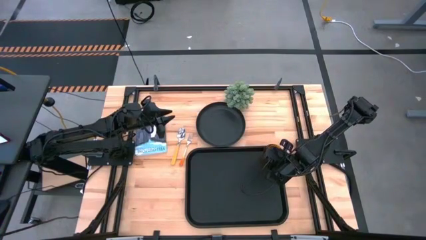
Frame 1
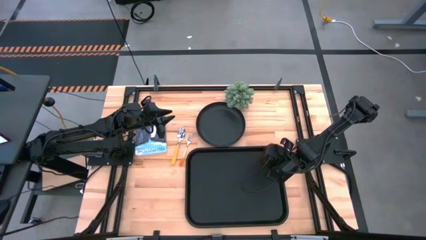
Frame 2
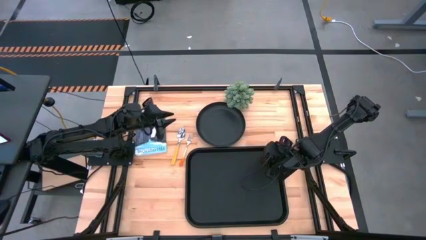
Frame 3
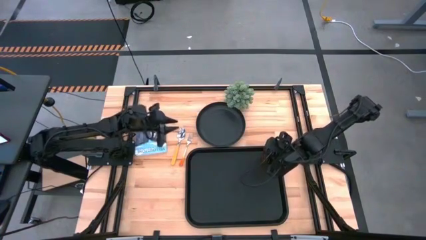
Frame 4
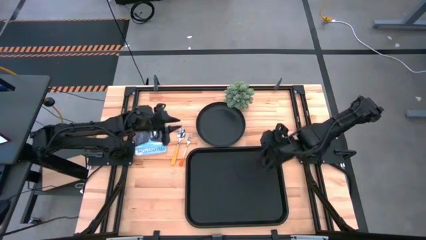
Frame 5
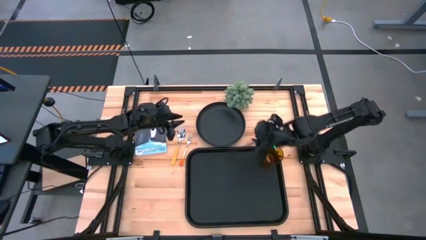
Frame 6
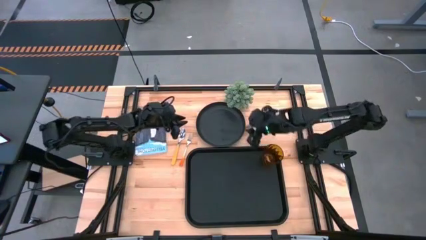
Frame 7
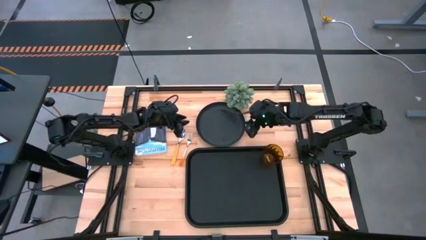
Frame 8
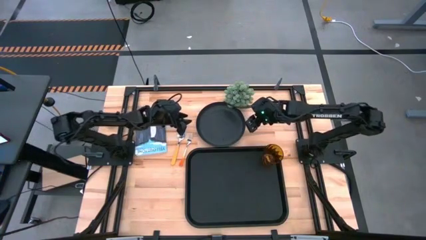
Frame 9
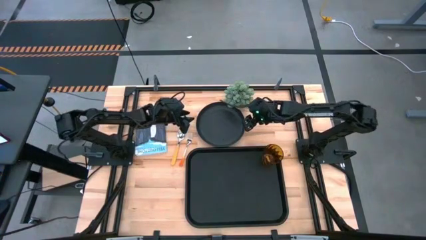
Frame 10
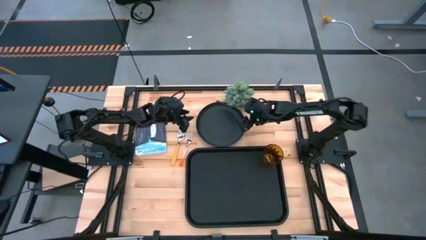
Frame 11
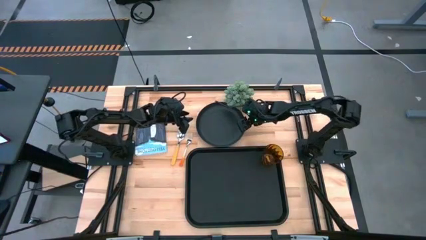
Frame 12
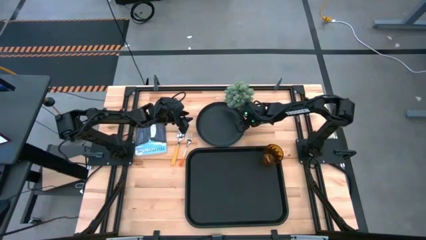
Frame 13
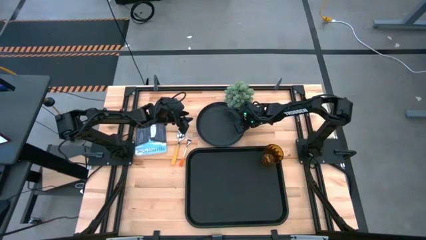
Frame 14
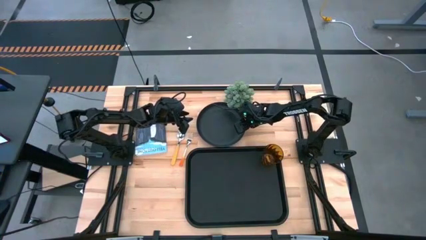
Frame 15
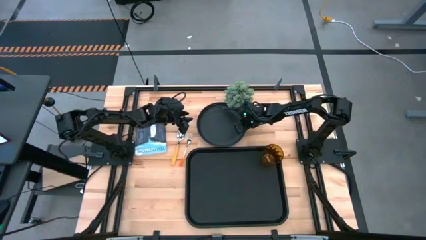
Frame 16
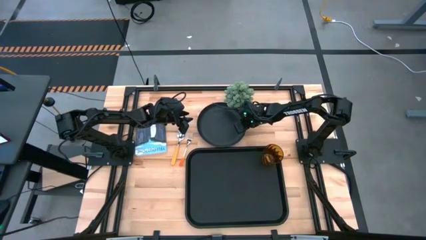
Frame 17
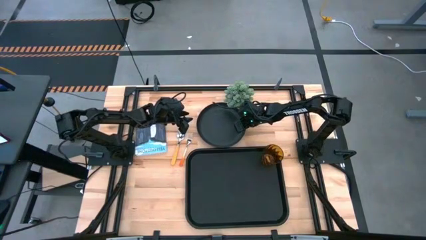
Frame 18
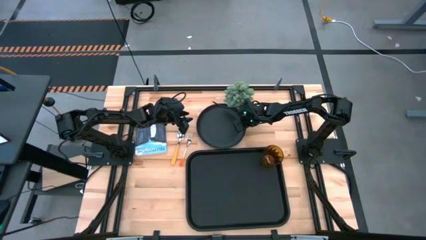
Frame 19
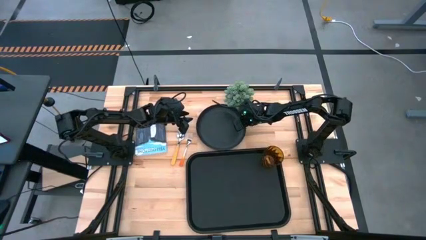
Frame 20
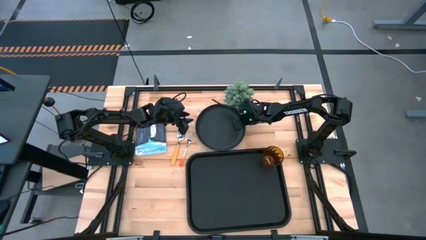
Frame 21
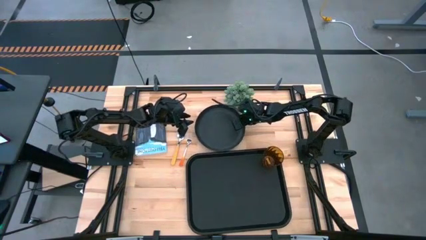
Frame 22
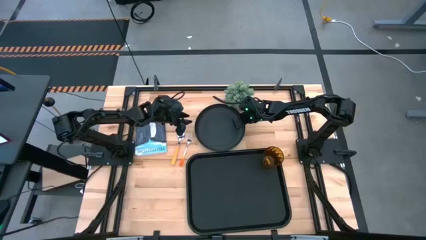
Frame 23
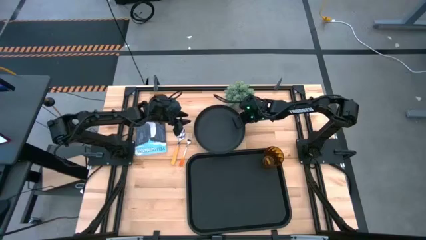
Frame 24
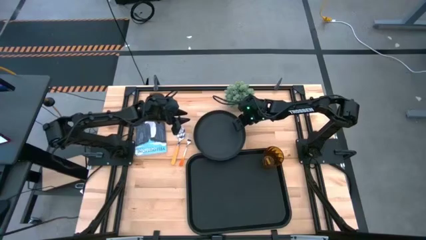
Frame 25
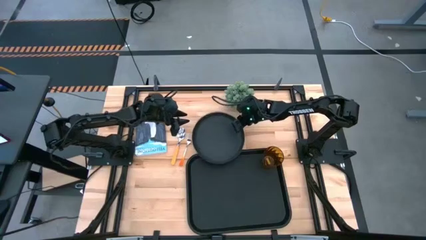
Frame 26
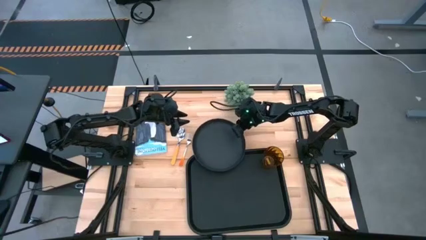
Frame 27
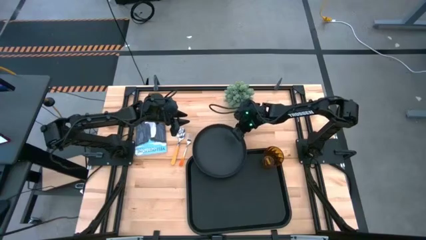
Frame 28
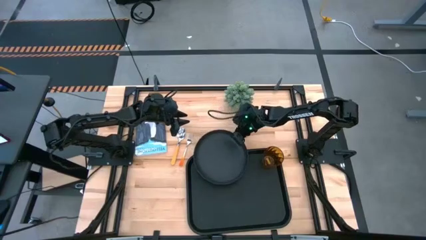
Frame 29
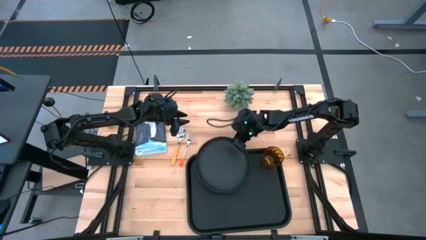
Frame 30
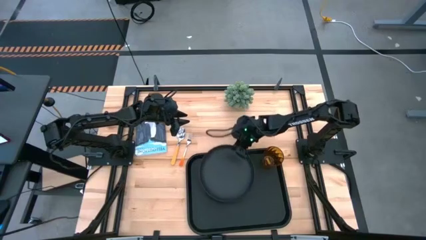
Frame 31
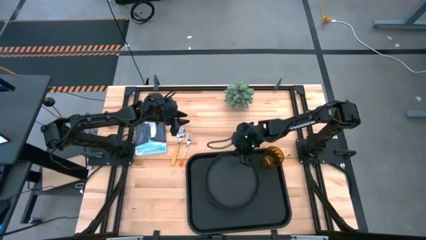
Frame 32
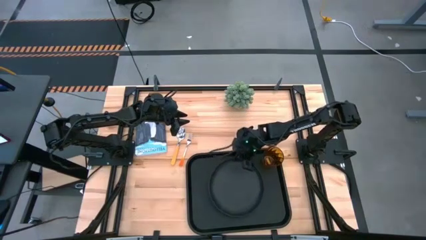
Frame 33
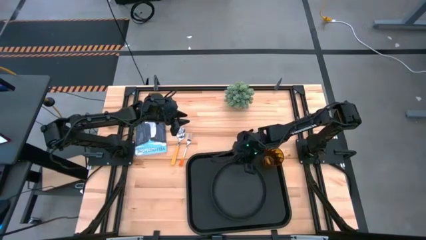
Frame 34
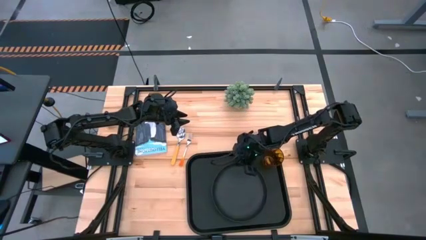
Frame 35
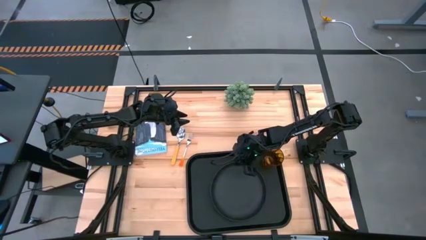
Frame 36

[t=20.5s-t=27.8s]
Task: Pick and place plate/cup/fork/spoon on tray
Put the black plate in the middle of the black tray

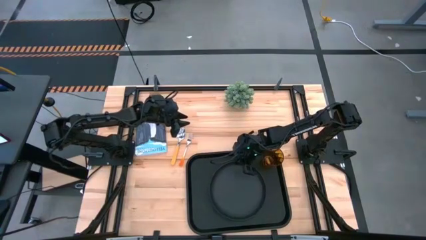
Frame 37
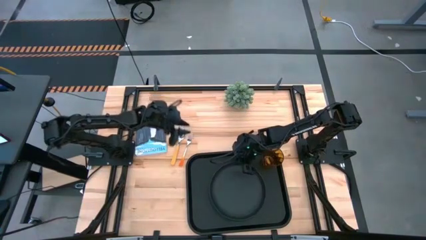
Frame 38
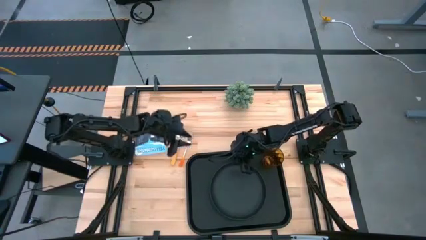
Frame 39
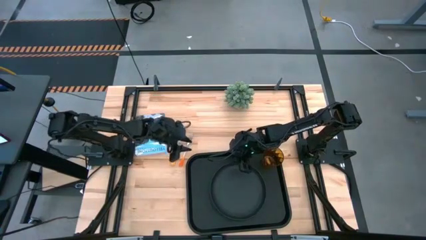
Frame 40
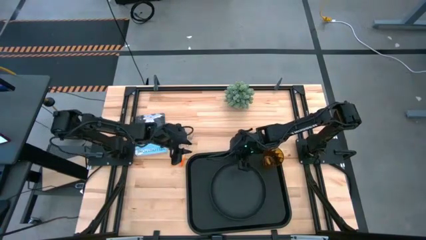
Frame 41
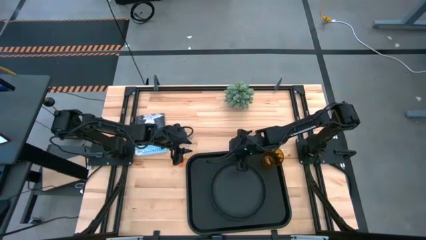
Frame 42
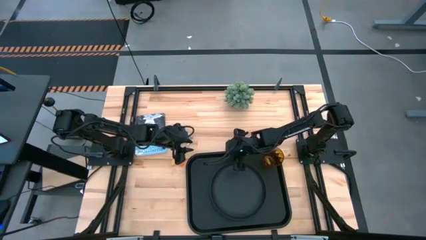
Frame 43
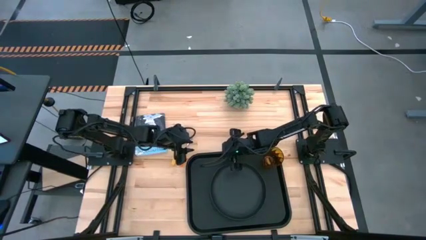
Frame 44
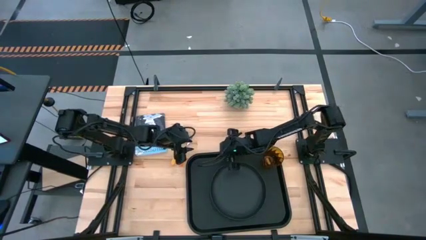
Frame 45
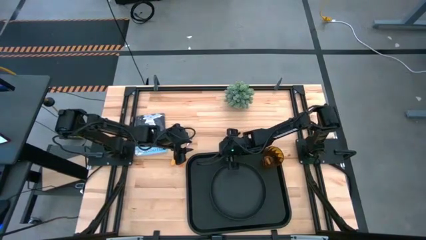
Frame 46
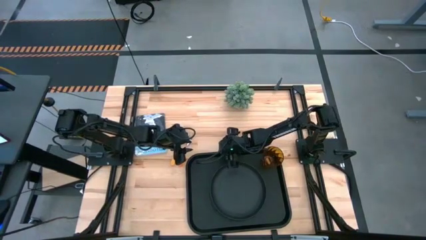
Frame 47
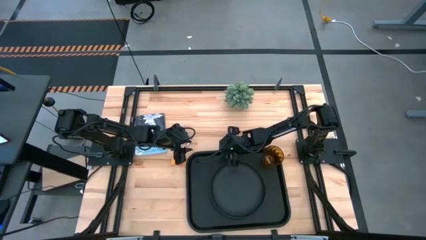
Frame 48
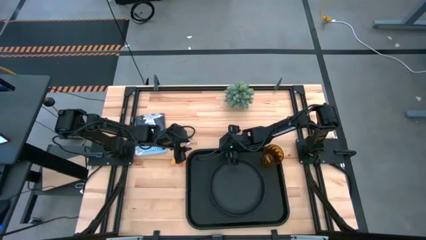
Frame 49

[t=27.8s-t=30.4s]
Adjust the position of the black tray on the table

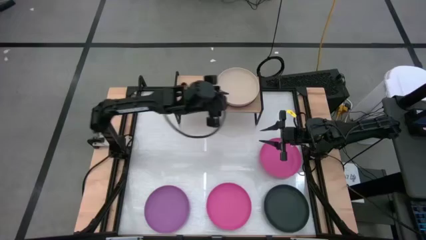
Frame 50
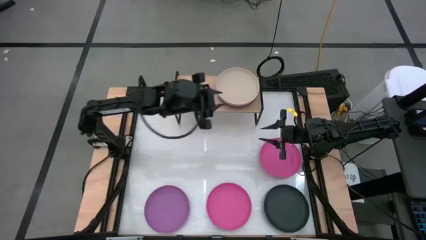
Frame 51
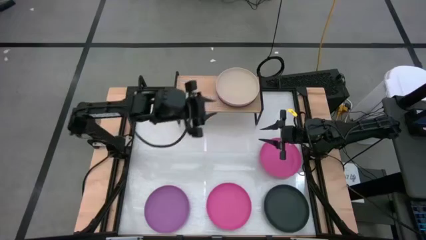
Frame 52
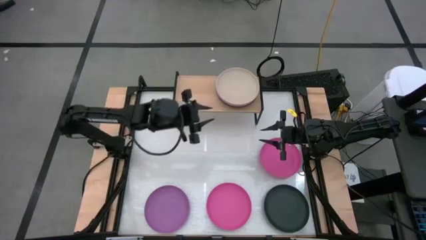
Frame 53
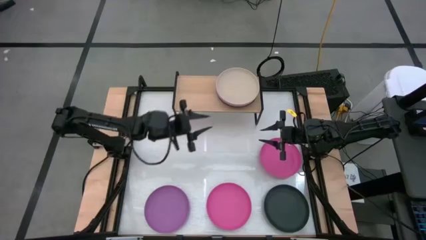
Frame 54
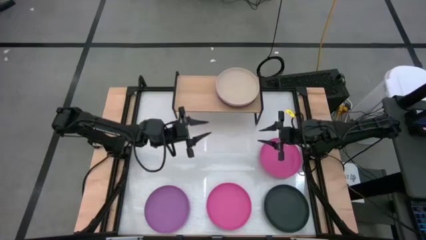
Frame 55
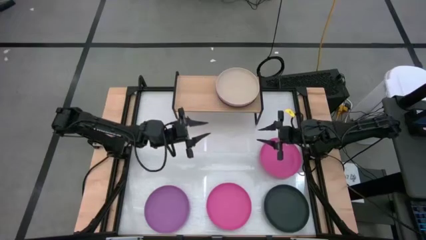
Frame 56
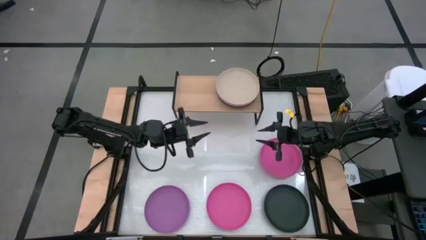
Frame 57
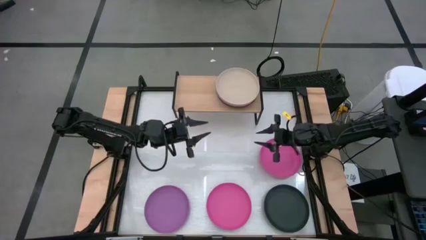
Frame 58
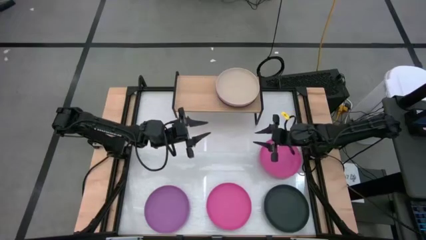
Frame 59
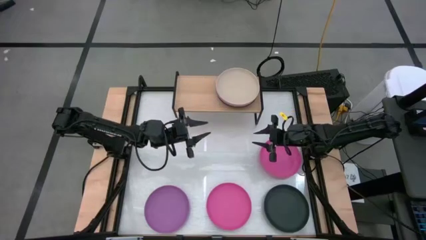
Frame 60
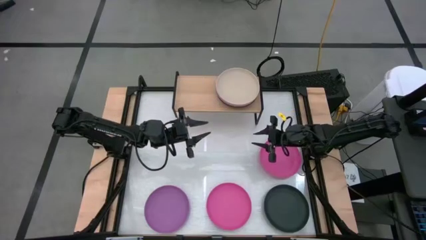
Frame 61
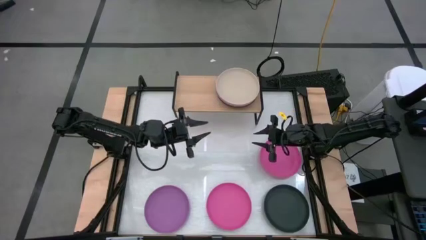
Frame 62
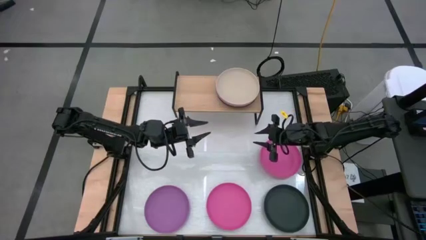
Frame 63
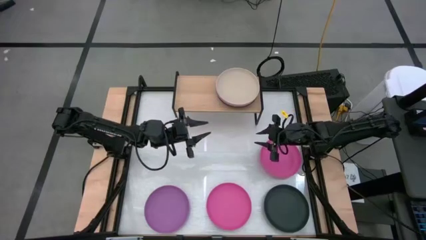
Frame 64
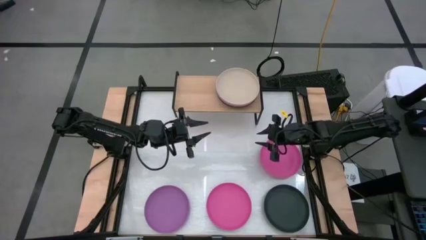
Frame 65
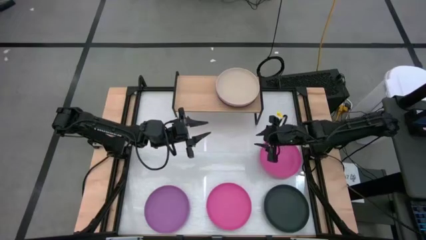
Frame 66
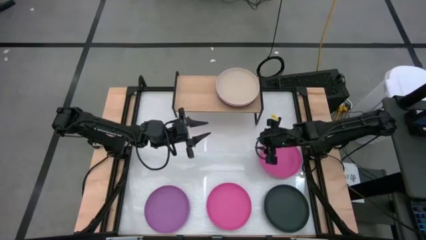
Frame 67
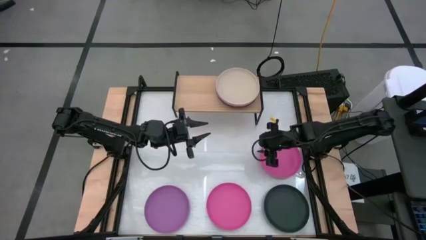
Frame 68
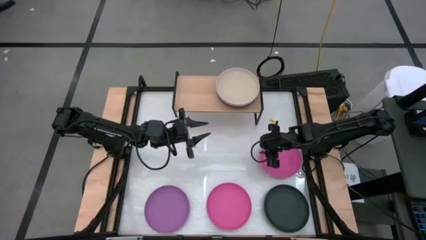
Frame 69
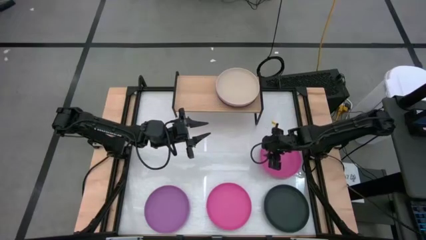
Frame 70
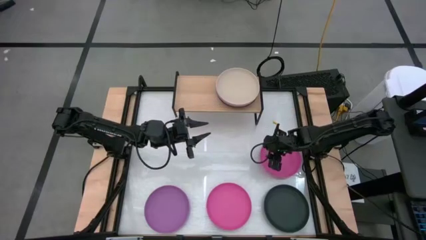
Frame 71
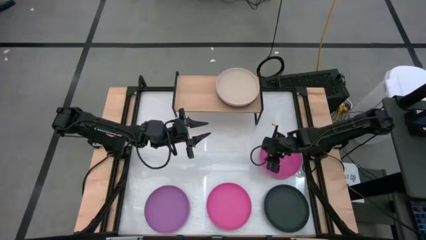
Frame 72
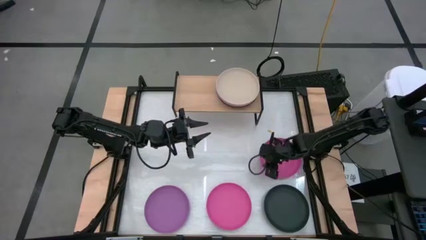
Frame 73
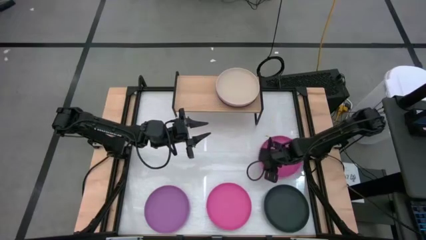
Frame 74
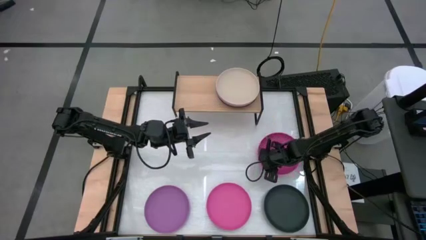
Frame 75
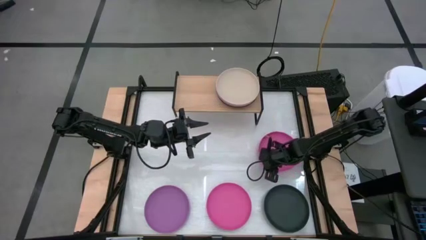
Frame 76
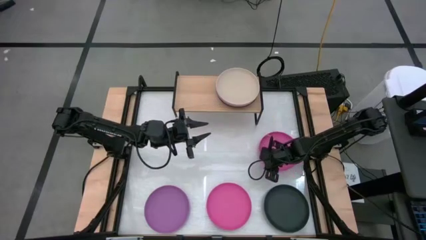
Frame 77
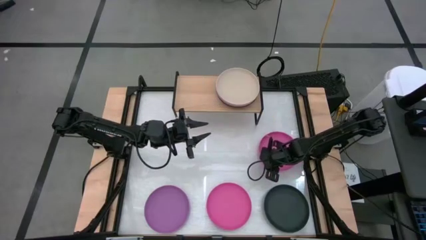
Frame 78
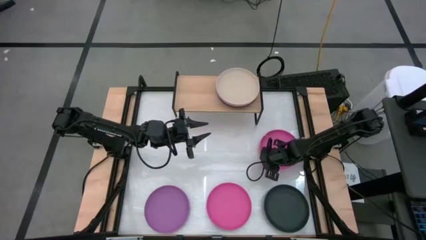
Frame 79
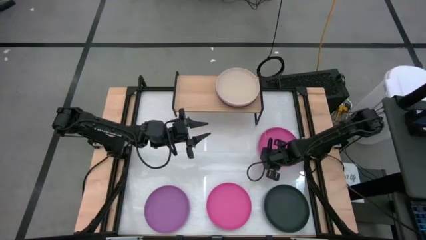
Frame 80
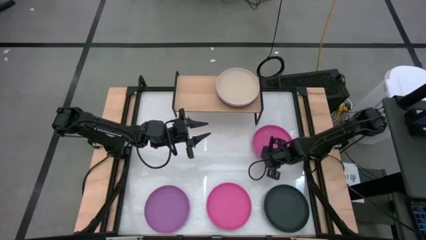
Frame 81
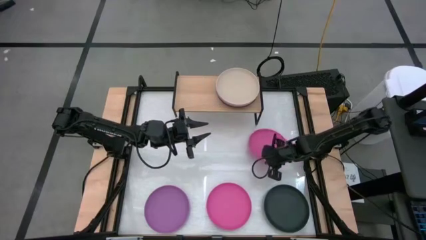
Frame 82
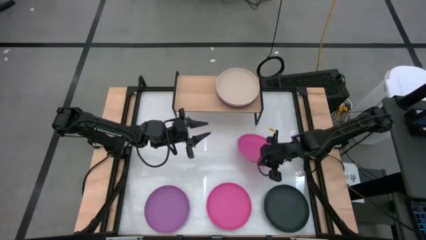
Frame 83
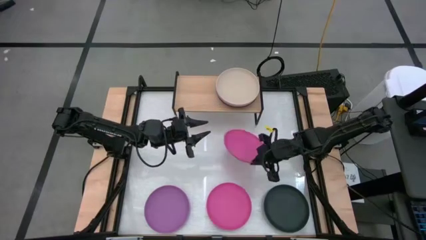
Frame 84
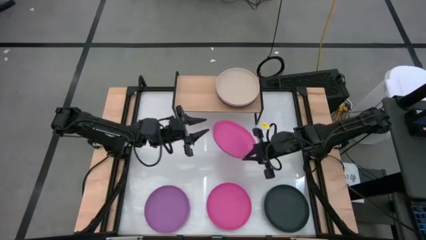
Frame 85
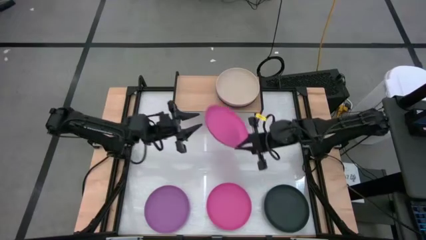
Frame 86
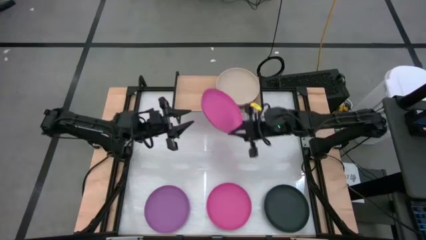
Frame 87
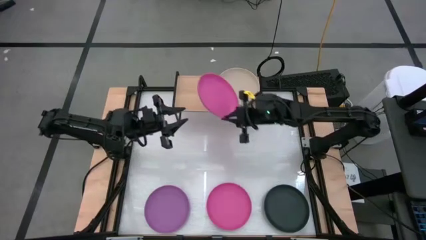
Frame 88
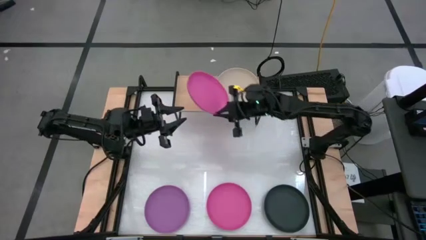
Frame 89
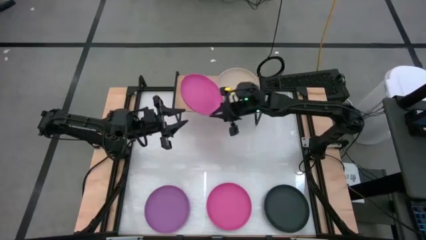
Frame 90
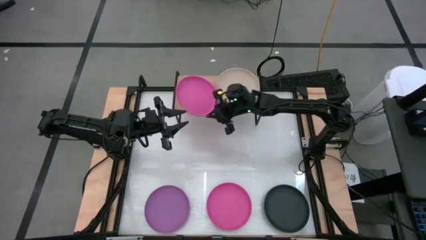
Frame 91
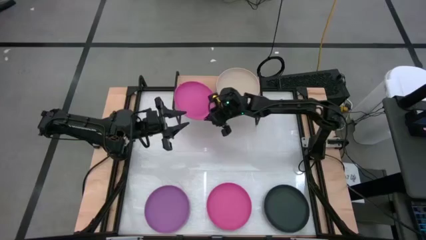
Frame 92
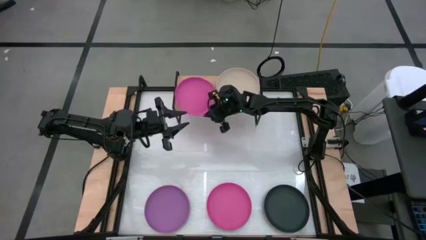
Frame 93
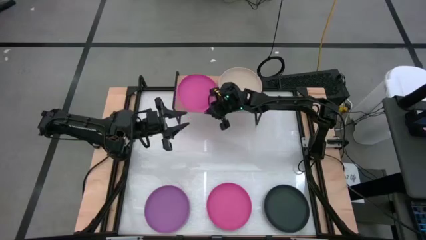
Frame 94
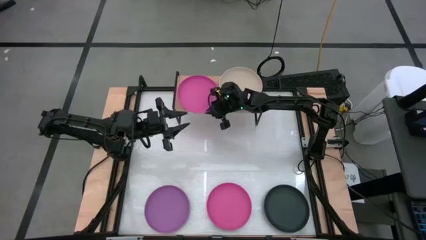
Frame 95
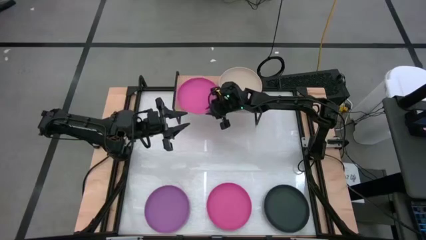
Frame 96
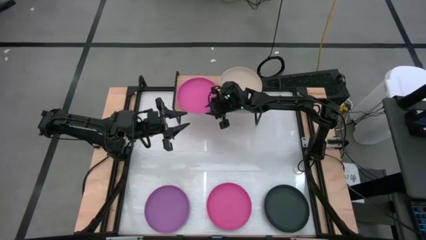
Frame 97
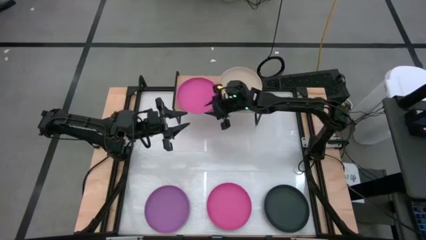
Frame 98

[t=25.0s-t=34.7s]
Task: Place and stack plates onto a shelf
Put the top pink plate on the shelf
